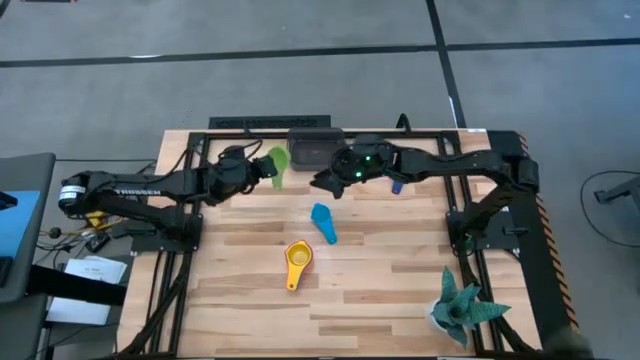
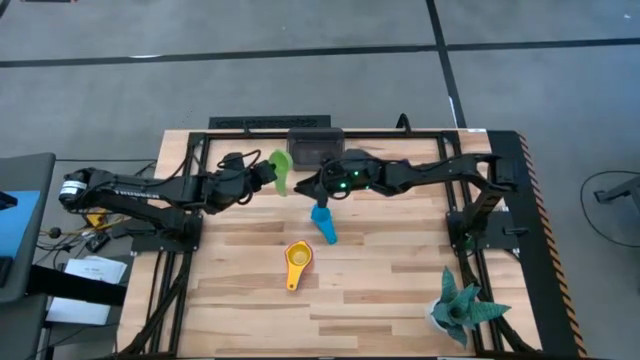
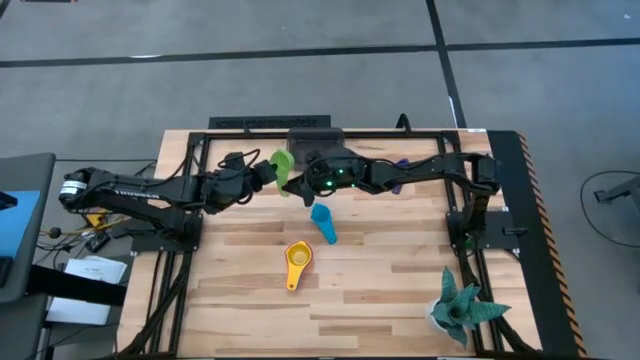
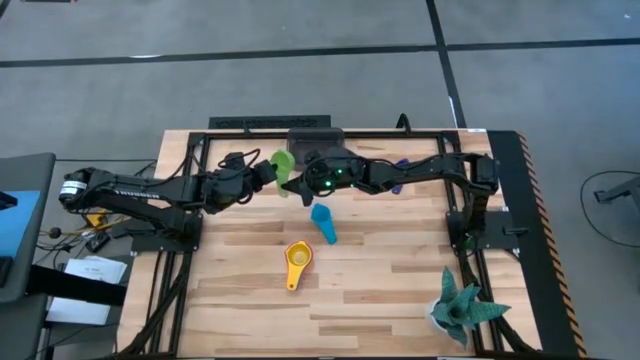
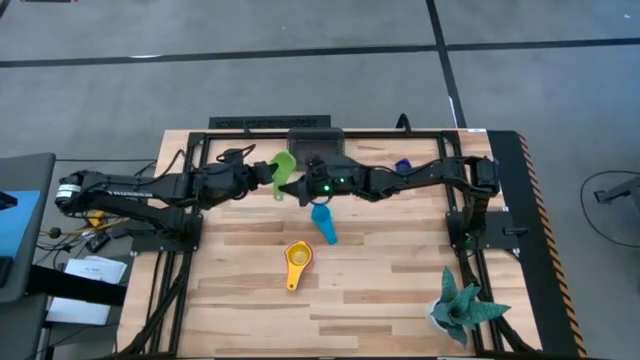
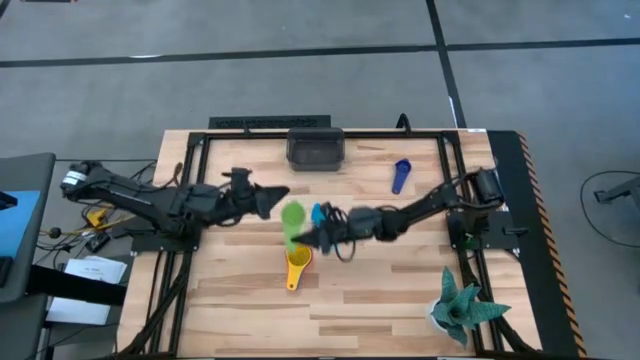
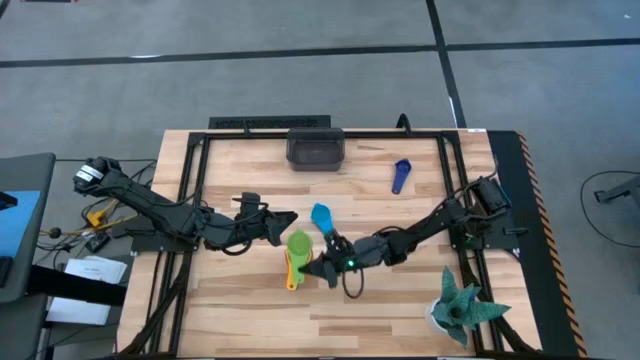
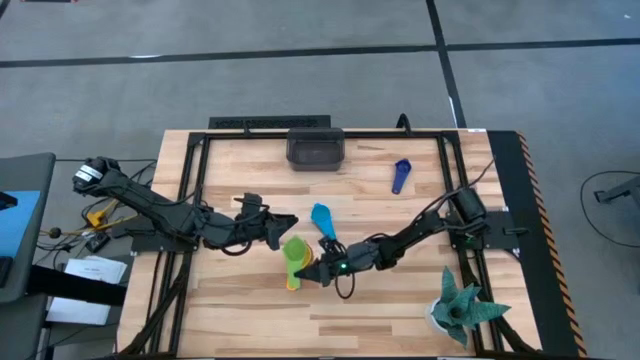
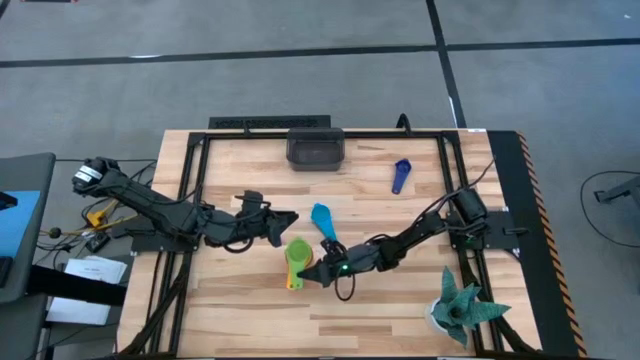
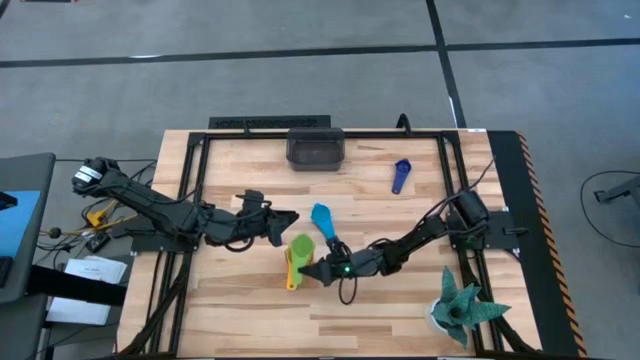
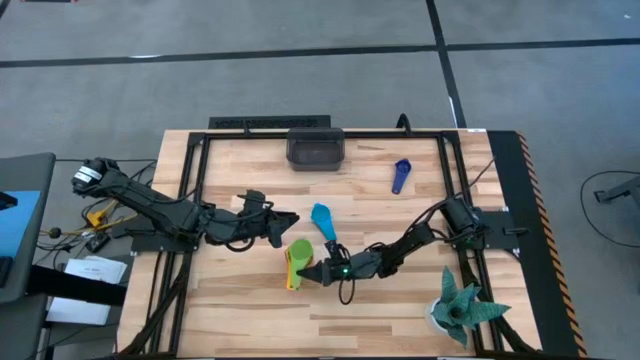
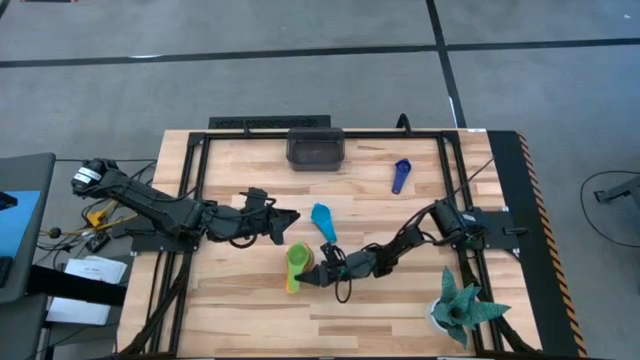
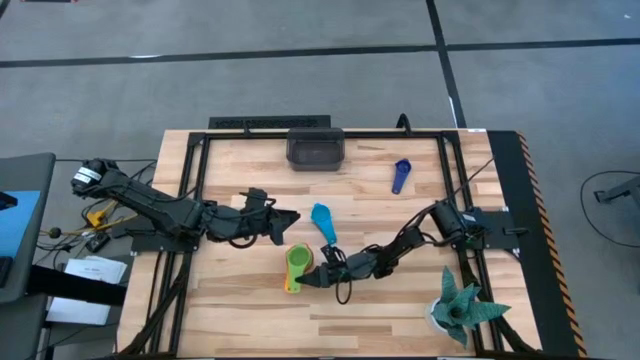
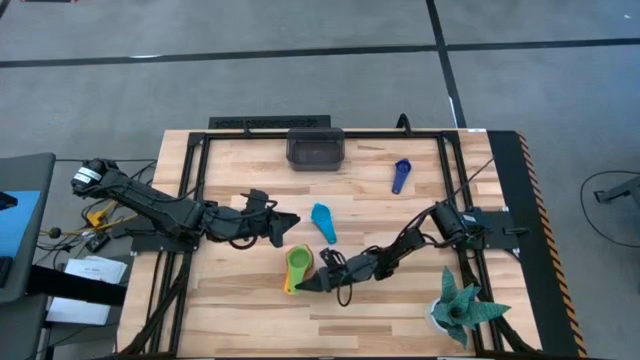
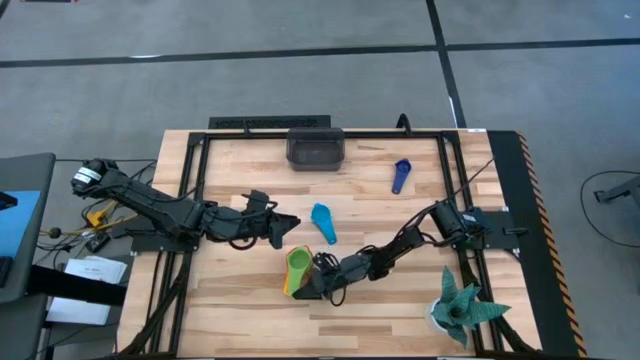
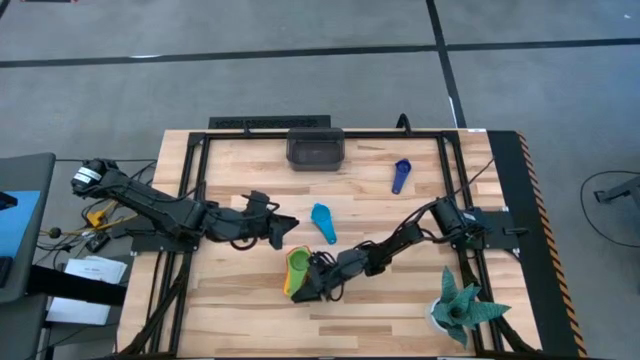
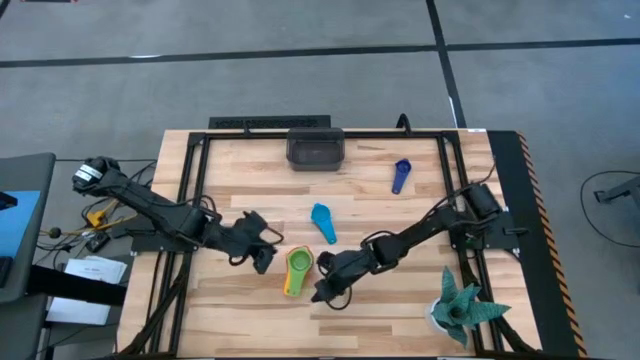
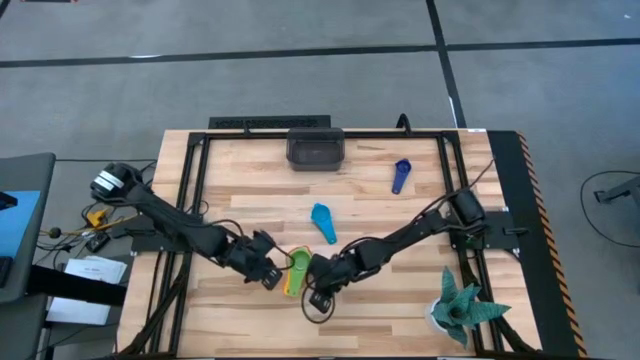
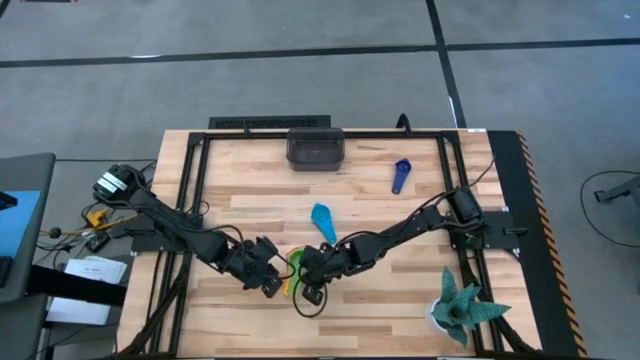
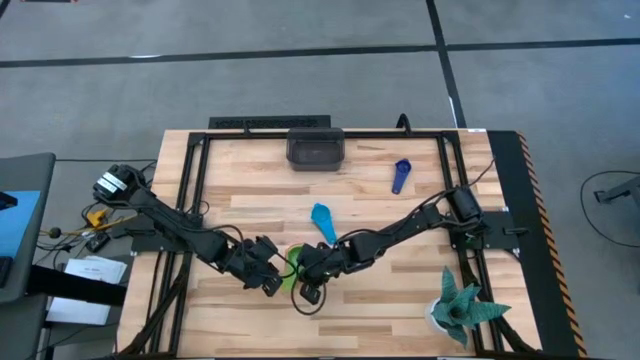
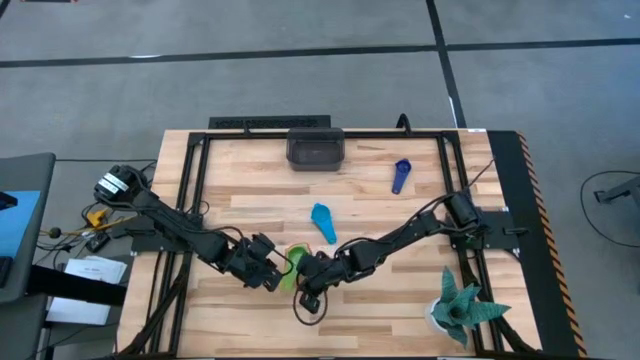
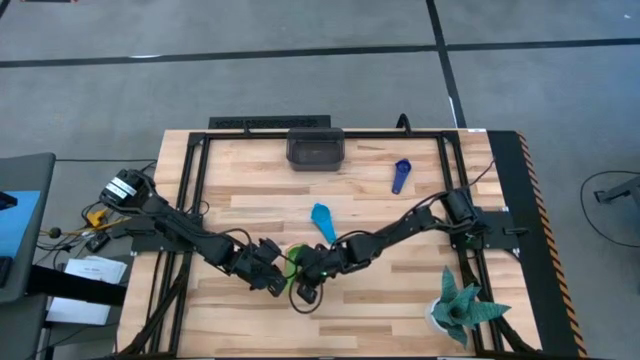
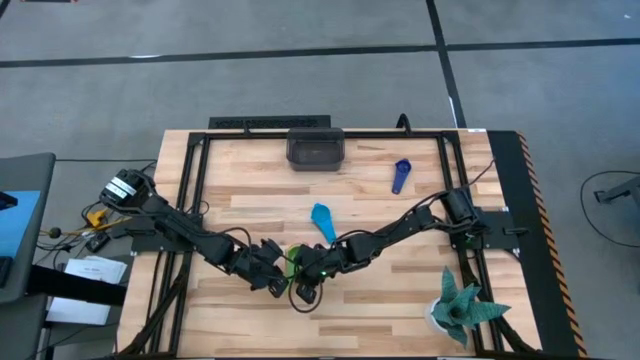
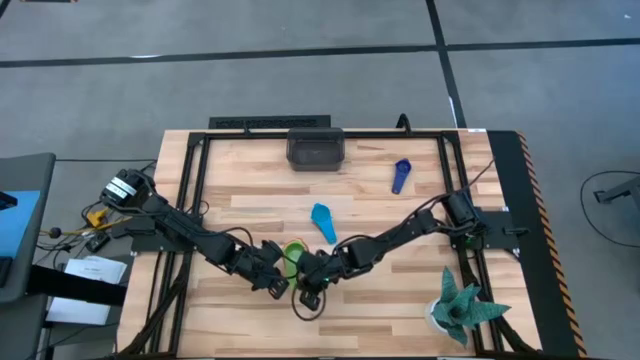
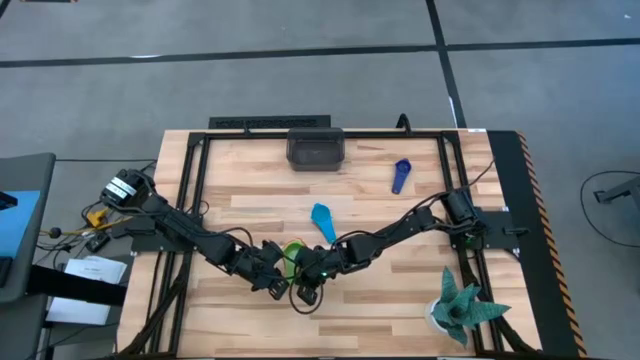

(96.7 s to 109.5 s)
Task: Nest measuring cups in basket
Stack the green measuring cup on top of the yellow measuring cup

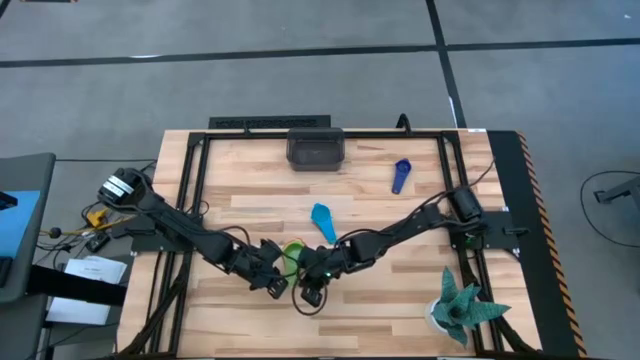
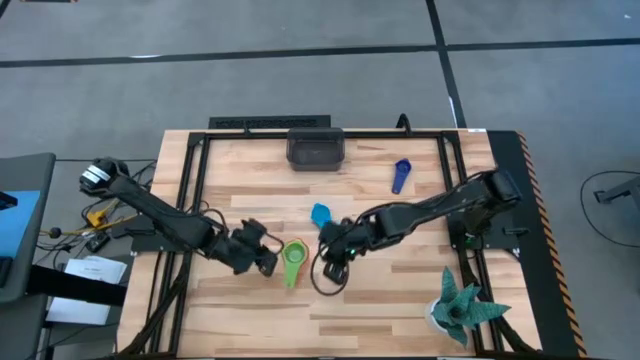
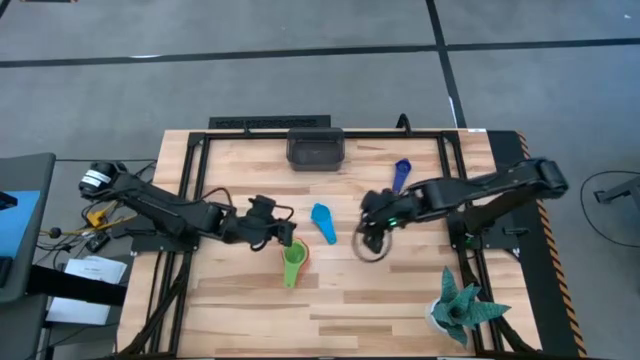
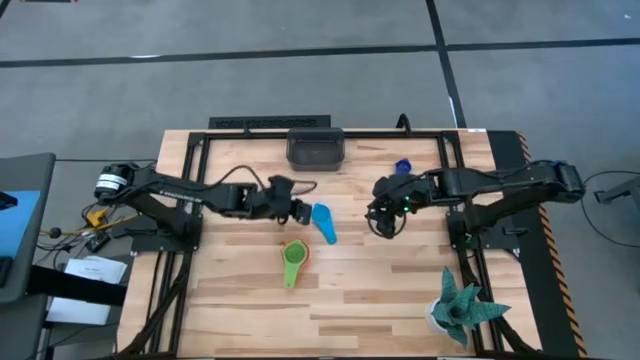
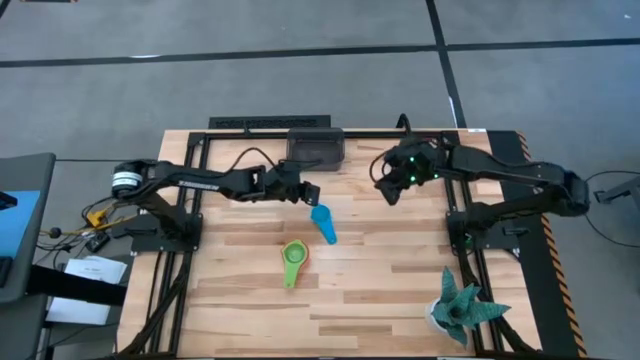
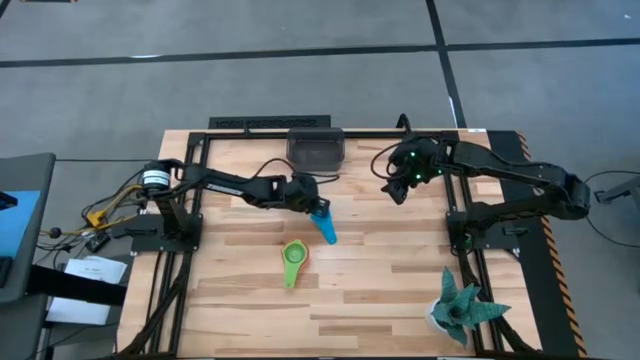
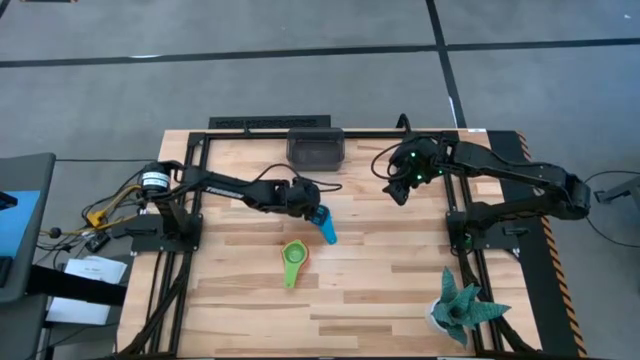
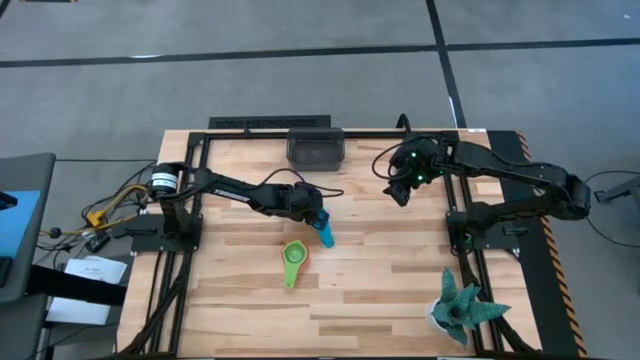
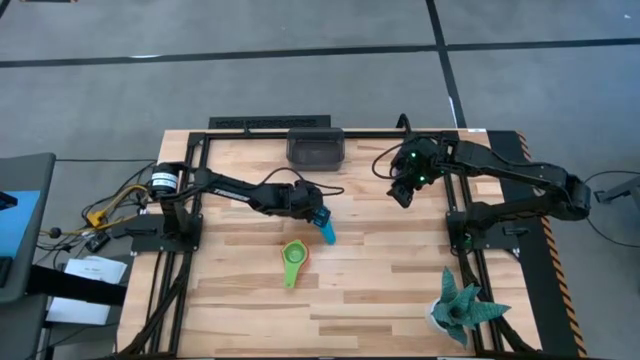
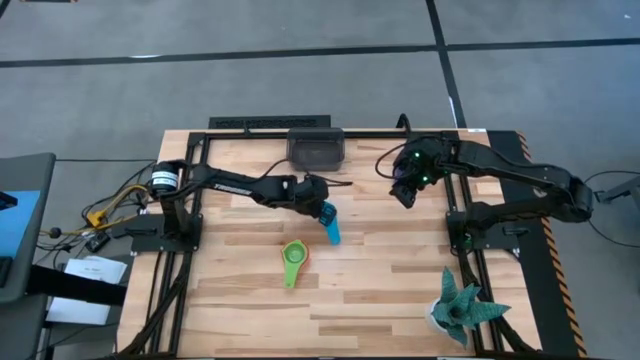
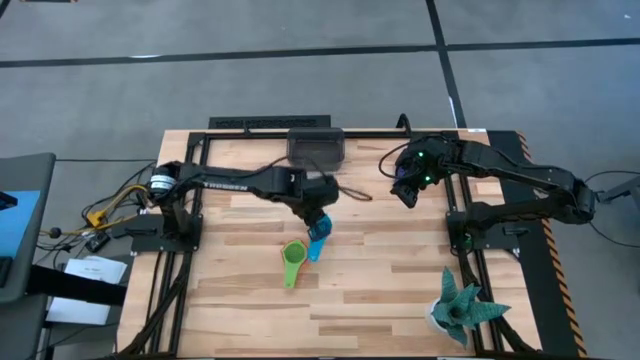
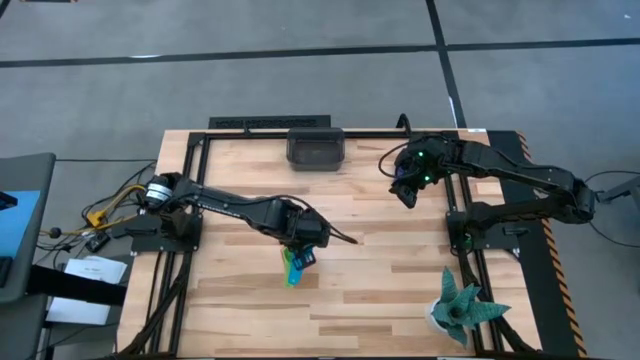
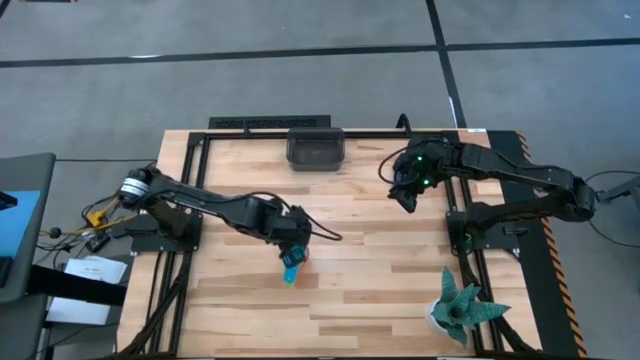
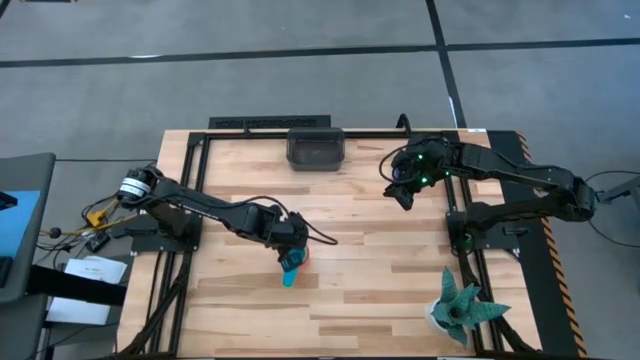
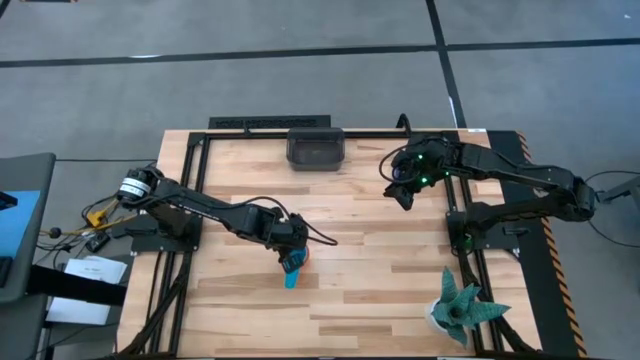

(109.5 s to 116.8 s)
Stack the light blue measuring cup on top of the green measuring cup
